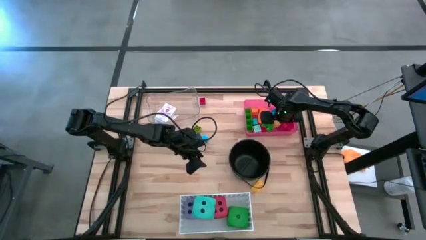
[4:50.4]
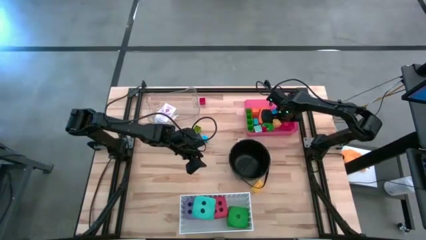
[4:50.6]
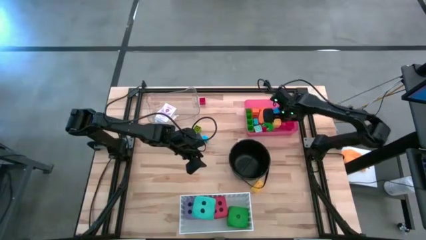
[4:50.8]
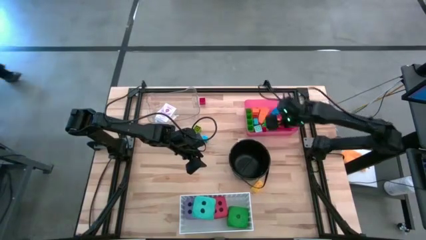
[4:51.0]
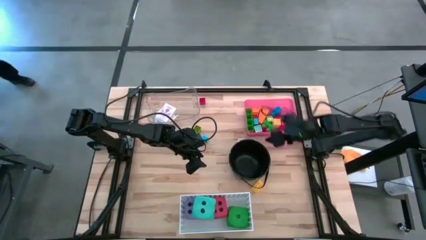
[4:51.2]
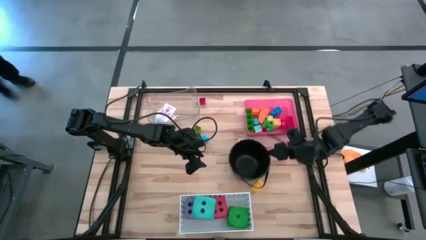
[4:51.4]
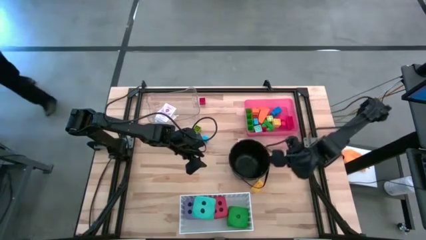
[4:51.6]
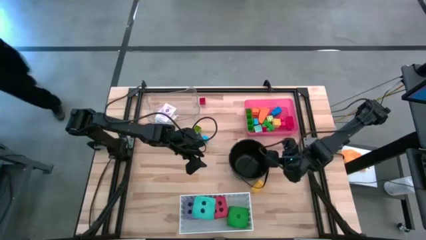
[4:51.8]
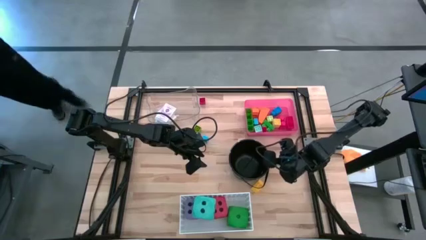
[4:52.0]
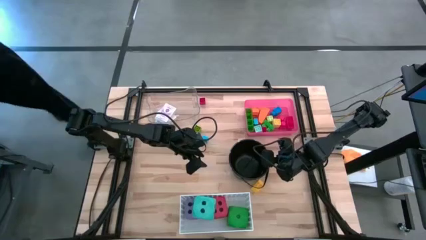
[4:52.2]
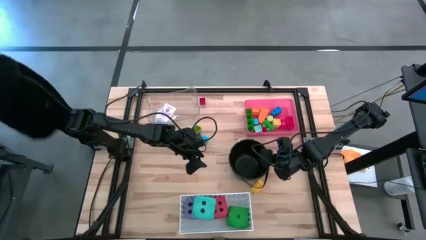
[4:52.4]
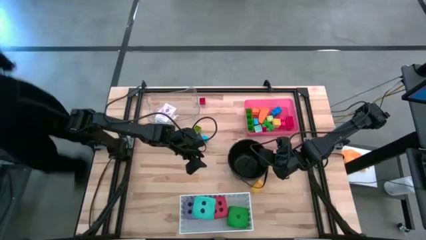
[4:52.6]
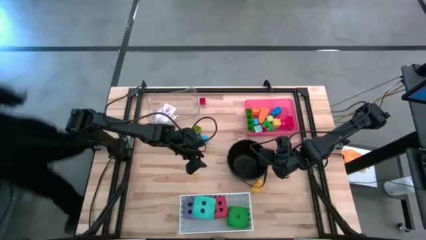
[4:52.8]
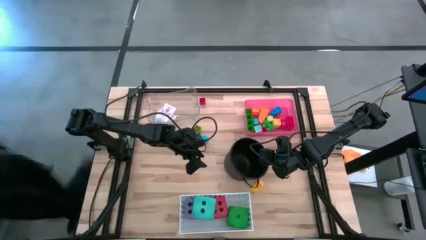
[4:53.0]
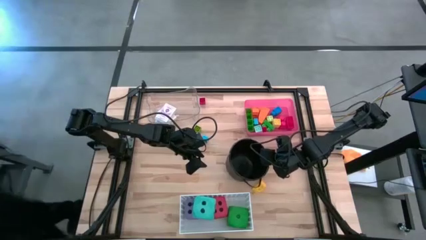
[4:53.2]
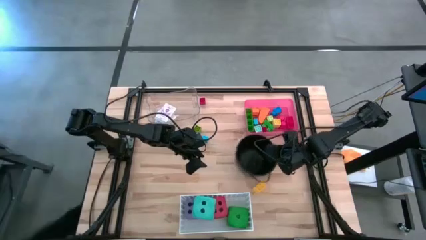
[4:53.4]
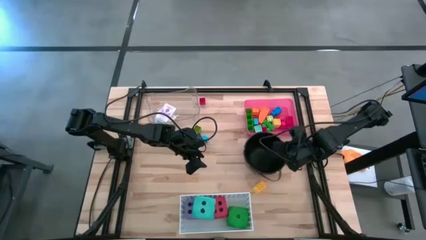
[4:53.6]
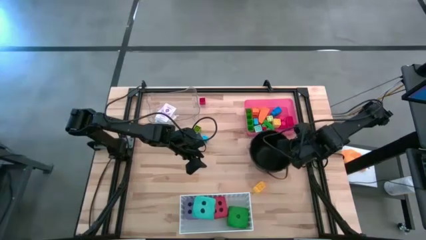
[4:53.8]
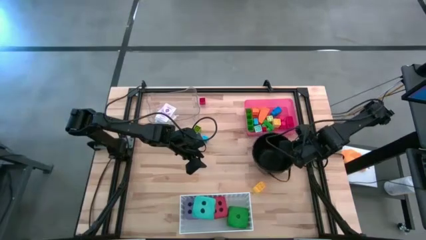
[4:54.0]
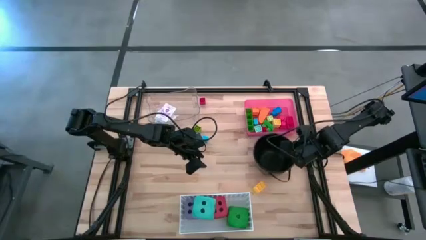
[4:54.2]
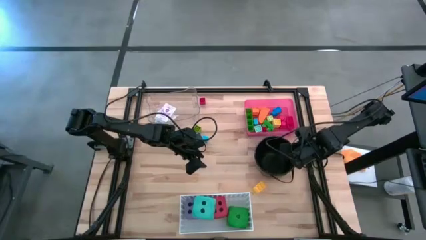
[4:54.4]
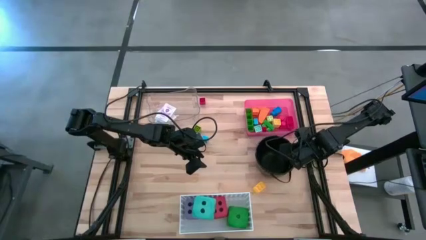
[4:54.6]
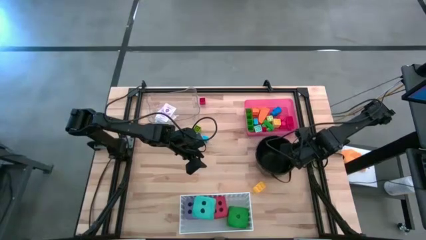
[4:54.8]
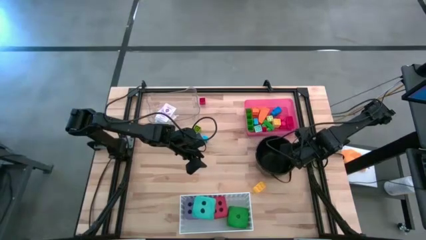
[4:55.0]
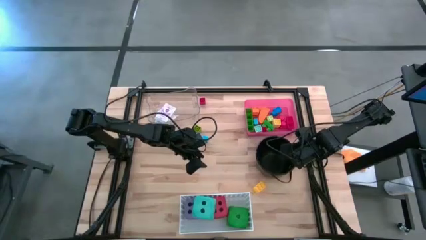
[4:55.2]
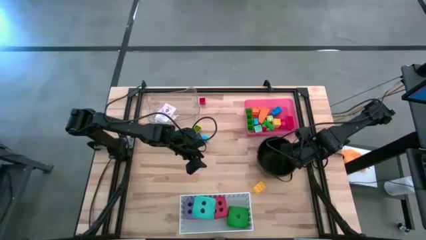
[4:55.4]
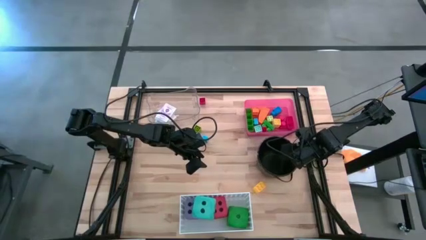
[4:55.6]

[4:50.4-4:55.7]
Task: Pick & Place Toys
Adjust the black bucket

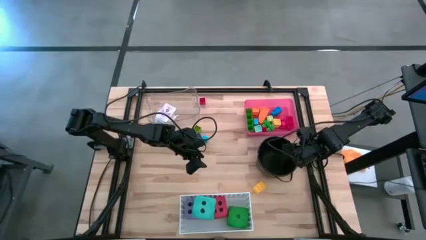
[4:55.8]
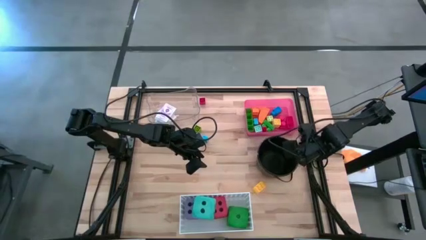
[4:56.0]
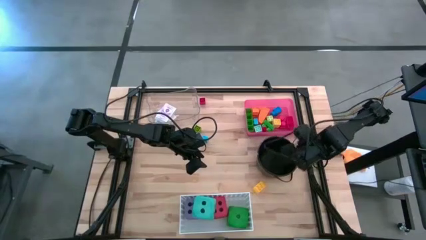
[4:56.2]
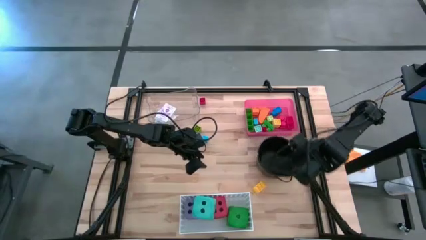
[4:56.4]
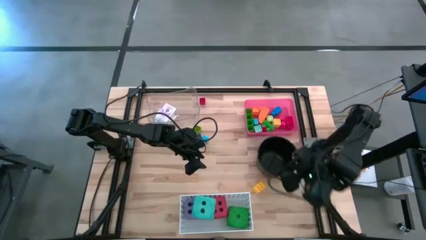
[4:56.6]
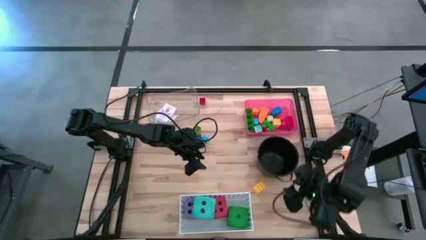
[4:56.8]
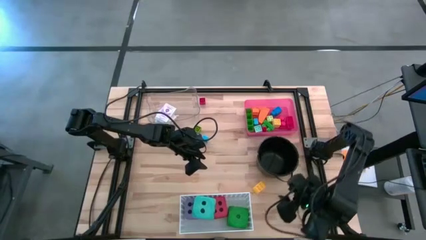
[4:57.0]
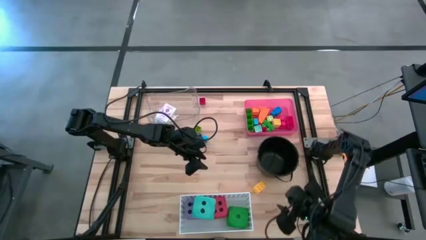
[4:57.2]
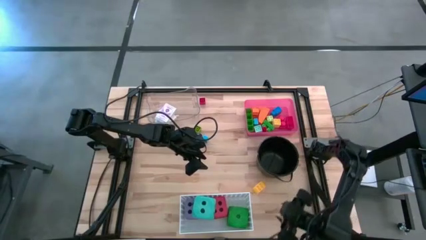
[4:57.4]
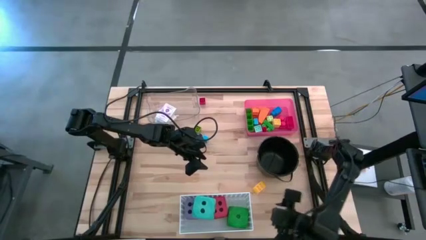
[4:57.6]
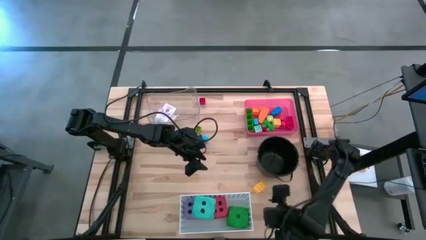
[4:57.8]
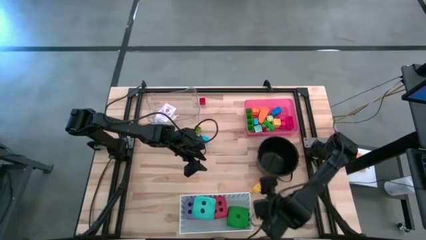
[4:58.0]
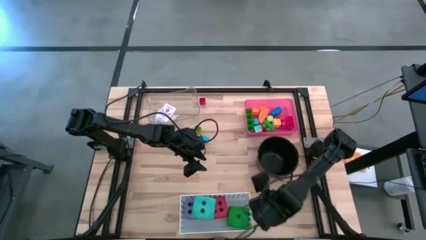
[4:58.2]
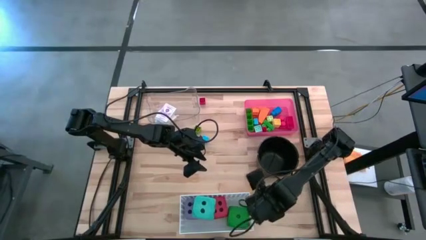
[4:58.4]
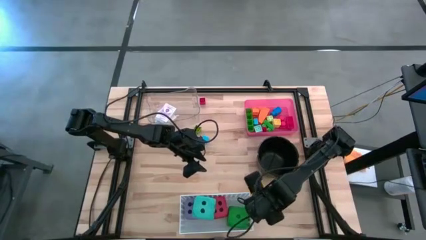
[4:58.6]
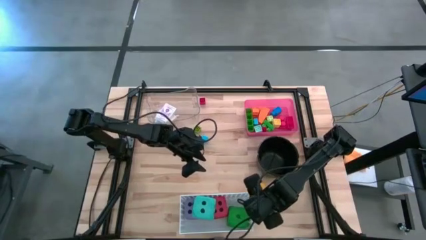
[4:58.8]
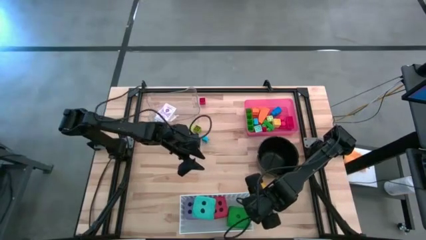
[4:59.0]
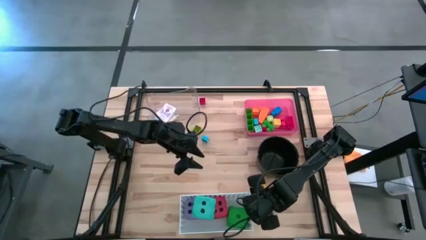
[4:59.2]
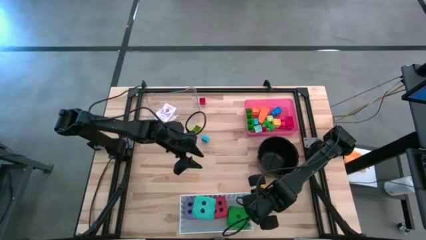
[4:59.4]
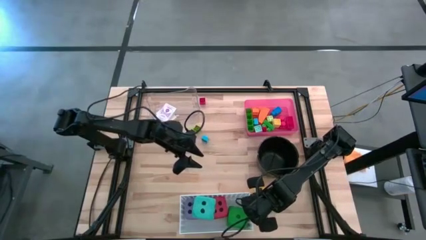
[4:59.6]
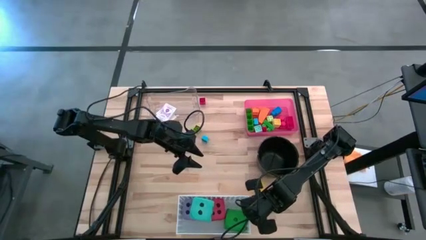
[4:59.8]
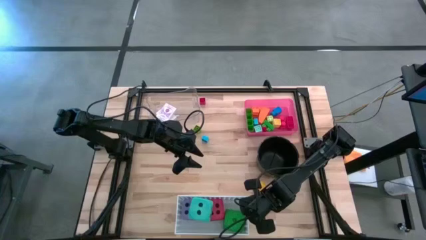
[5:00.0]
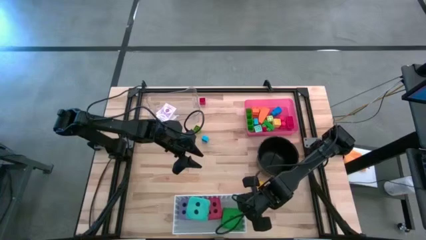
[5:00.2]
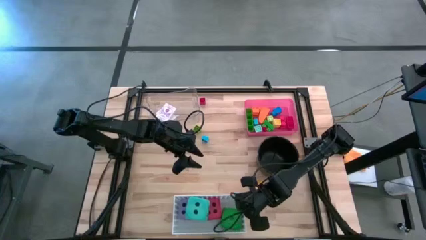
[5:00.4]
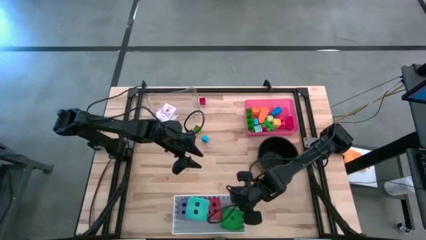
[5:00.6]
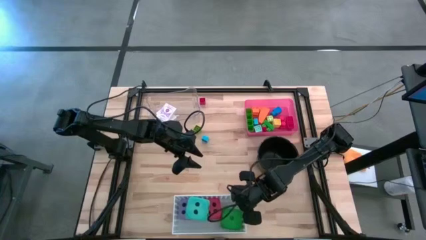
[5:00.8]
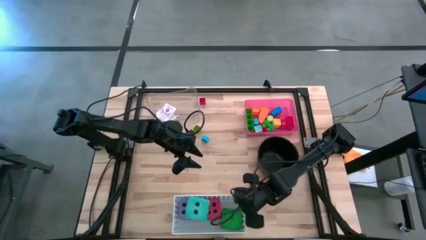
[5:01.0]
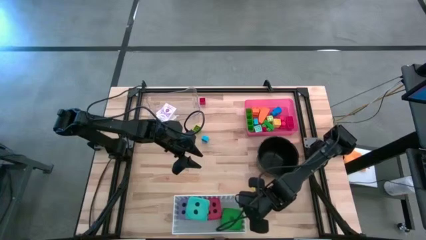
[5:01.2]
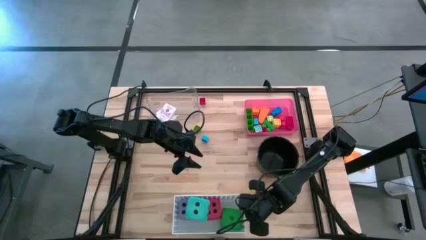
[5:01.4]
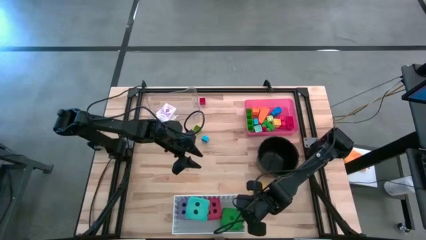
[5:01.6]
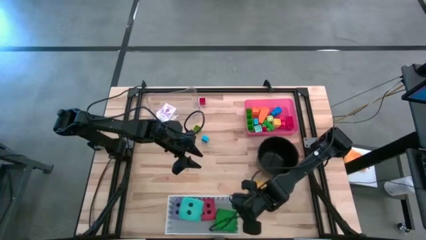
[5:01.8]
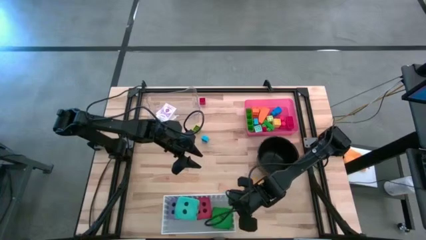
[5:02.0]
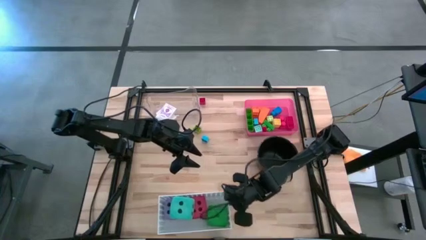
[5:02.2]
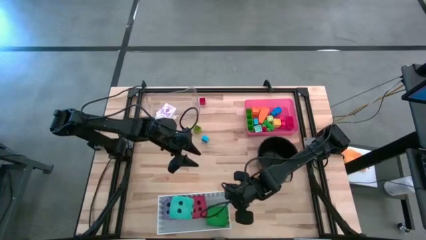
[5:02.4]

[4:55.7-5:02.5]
Adjust the white bin

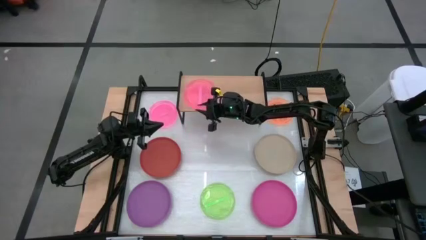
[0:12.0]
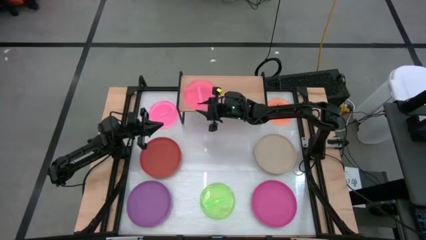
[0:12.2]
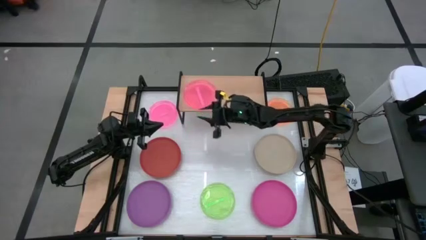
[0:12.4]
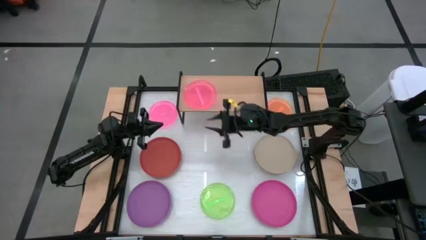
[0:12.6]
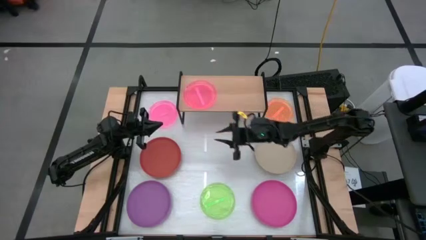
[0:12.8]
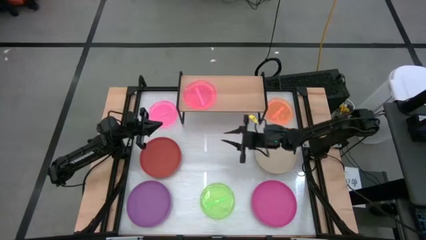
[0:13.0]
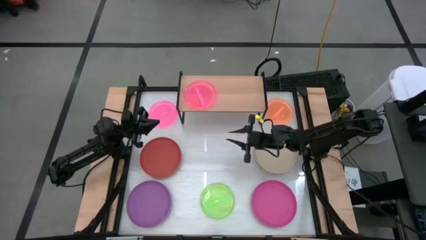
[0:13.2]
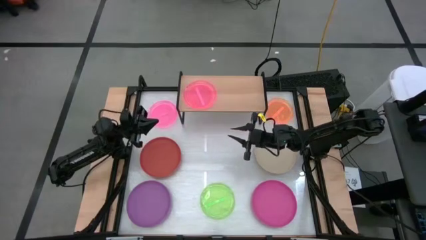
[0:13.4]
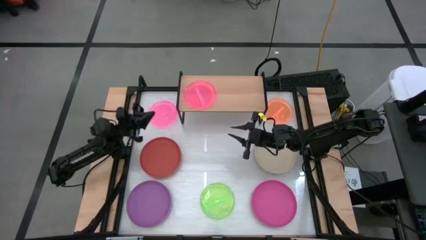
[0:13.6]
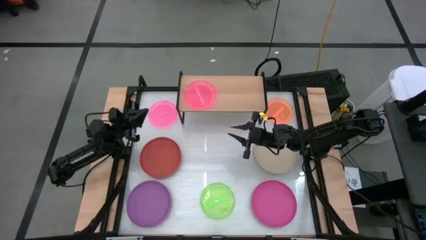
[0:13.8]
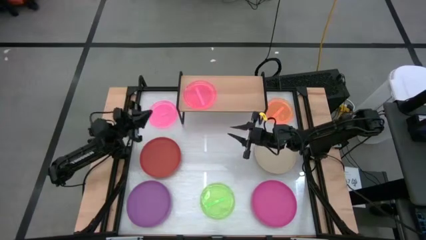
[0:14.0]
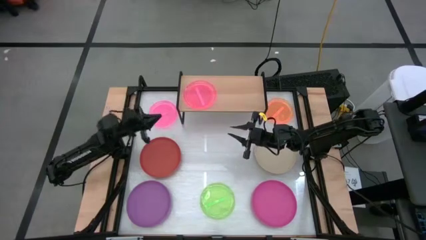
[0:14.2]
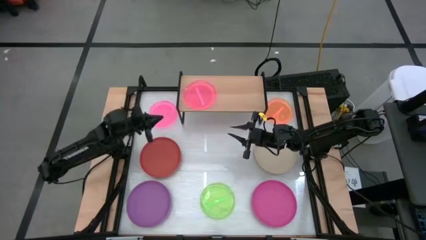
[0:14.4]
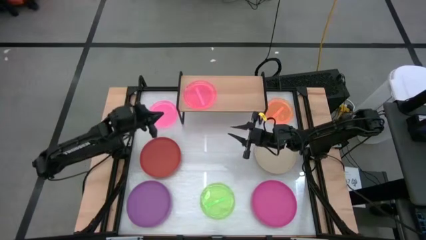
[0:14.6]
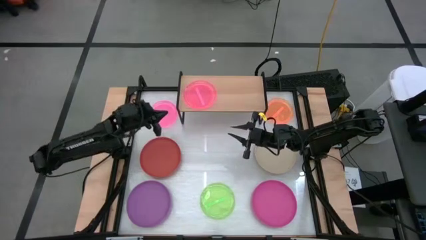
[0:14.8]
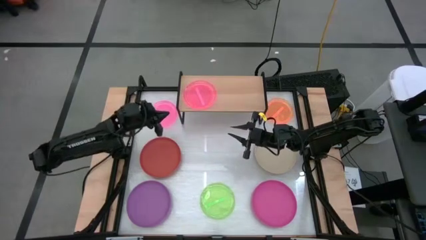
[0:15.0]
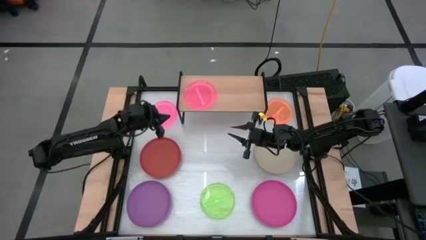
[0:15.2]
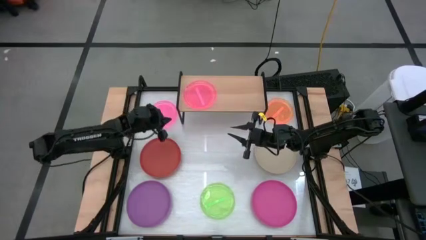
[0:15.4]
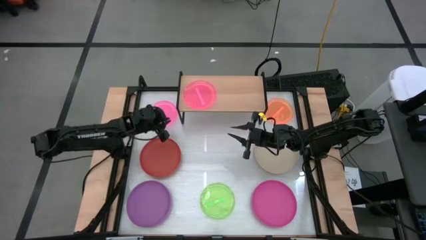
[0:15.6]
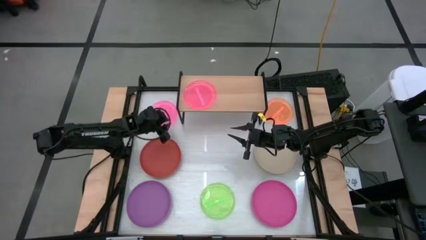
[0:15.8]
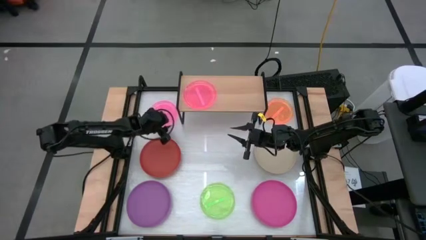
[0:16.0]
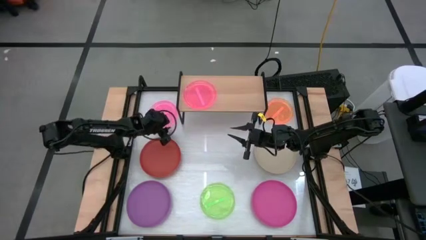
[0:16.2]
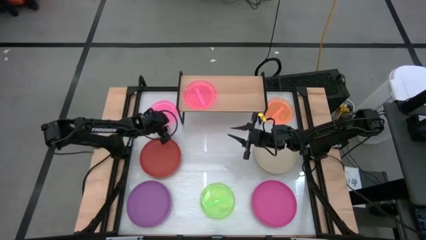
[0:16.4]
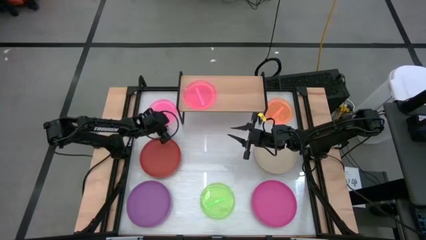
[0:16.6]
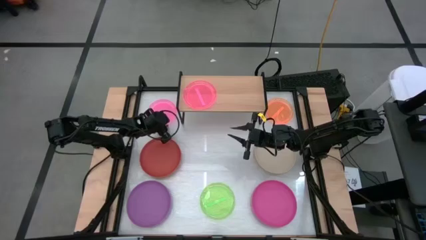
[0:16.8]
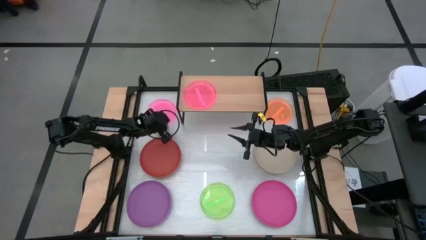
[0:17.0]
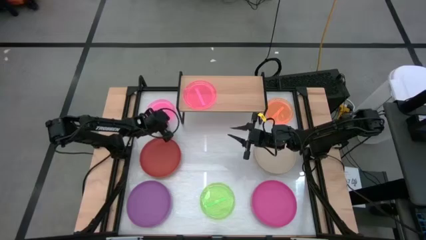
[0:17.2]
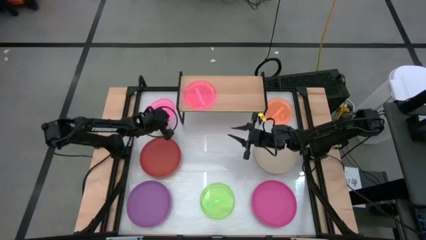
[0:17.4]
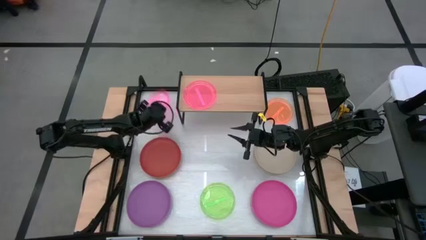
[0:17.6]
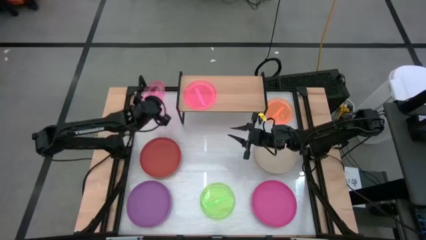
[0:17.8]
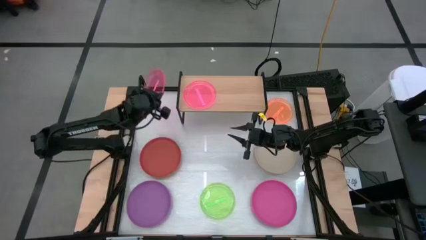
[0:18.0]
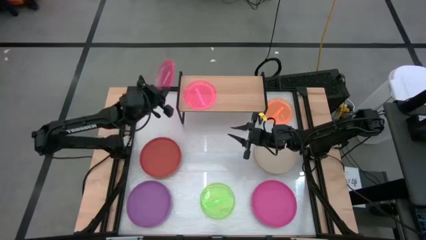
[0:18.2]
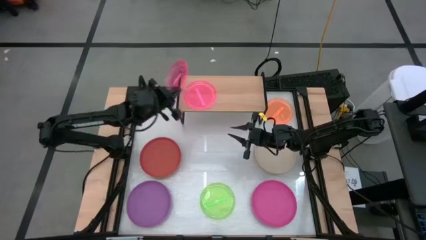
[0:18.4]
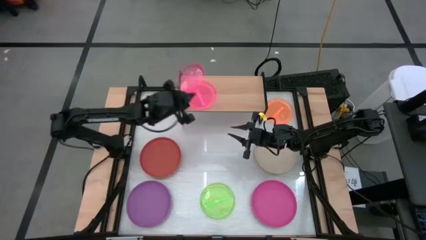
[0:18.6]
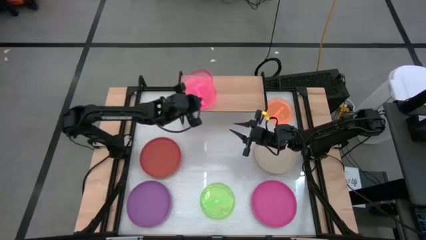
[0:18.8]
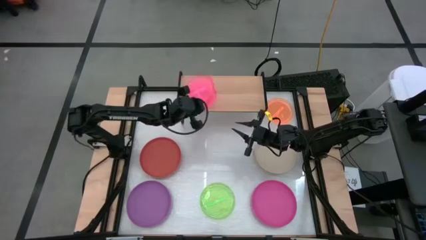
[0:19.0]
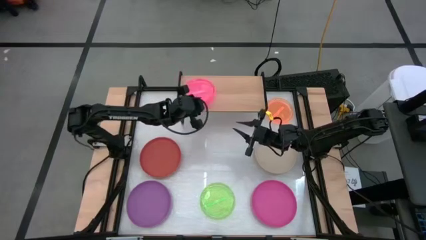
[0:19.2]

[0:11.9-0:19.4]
Task: Place and stack plates onto a shelf
Stack the small pink plate on top of the small pink plate on the shelf
